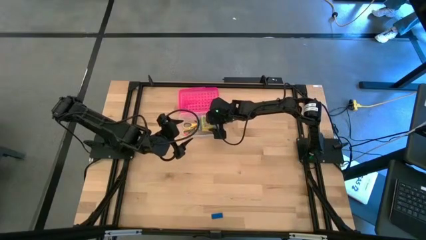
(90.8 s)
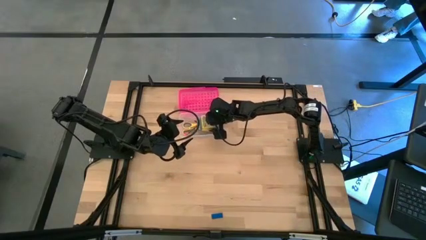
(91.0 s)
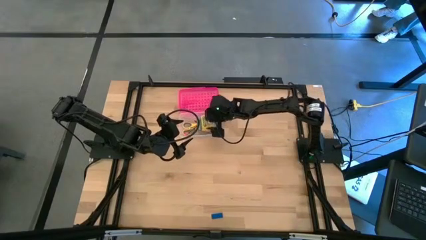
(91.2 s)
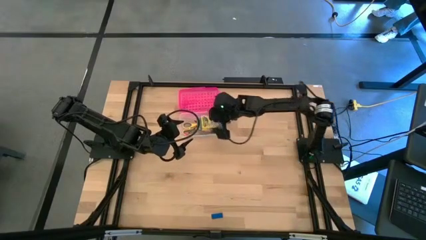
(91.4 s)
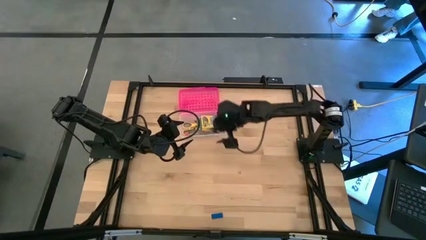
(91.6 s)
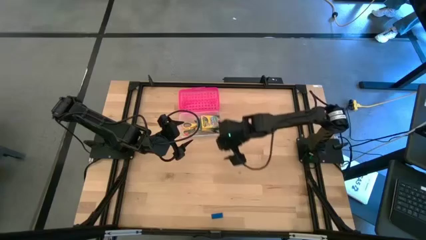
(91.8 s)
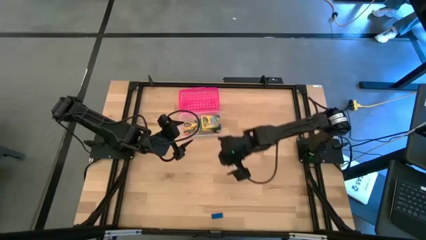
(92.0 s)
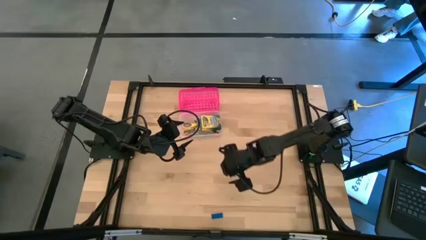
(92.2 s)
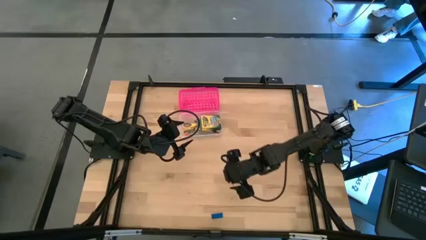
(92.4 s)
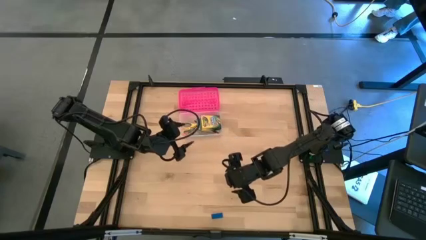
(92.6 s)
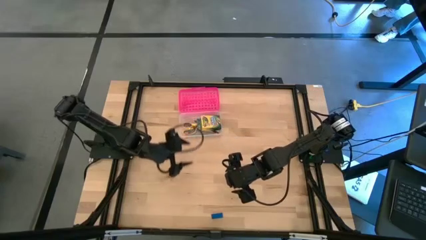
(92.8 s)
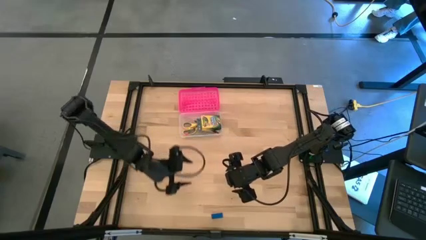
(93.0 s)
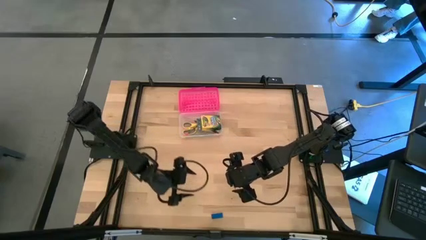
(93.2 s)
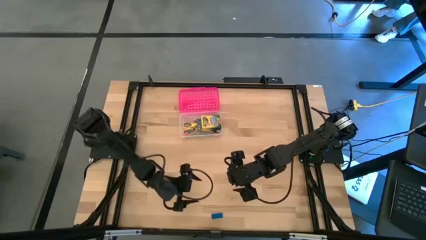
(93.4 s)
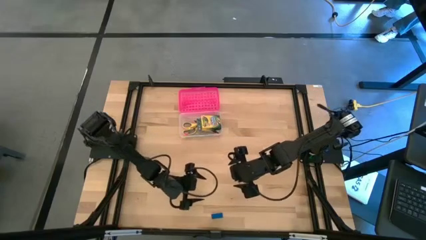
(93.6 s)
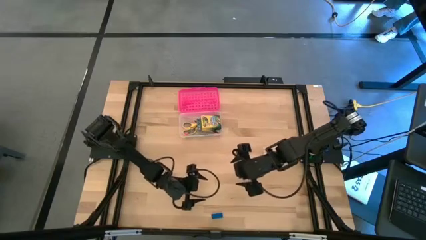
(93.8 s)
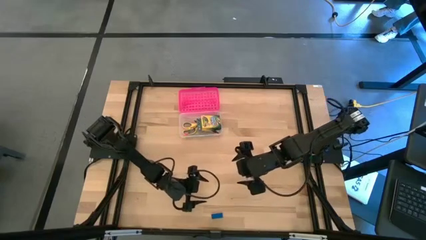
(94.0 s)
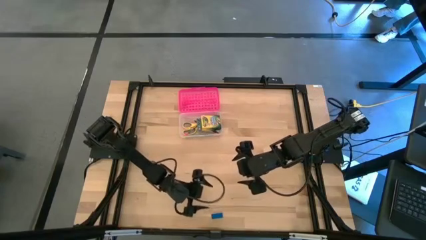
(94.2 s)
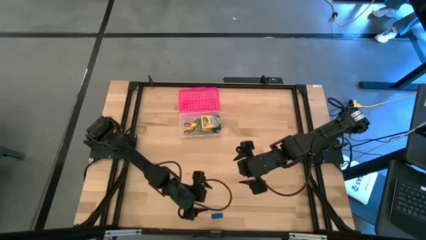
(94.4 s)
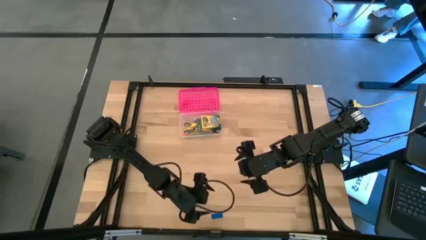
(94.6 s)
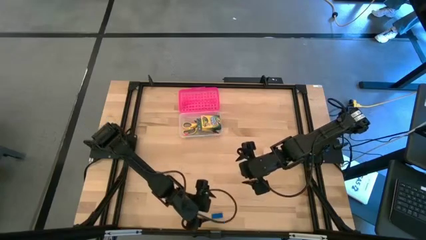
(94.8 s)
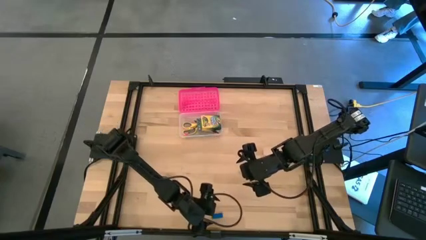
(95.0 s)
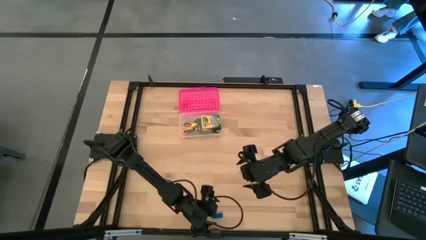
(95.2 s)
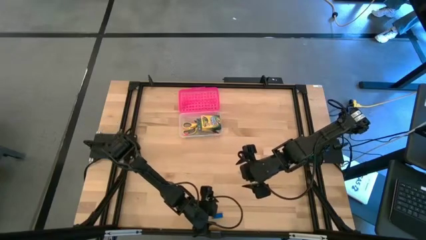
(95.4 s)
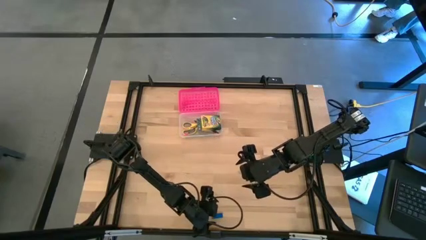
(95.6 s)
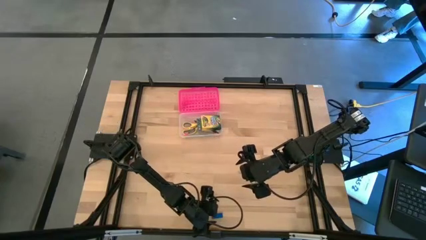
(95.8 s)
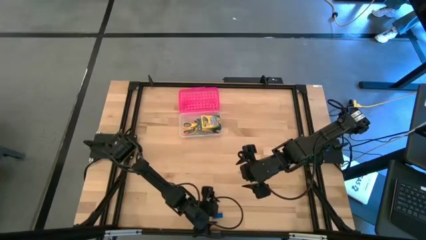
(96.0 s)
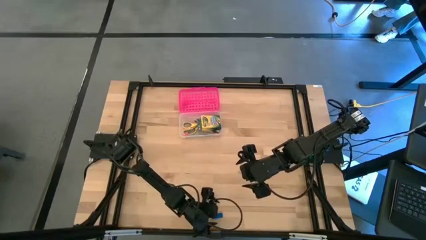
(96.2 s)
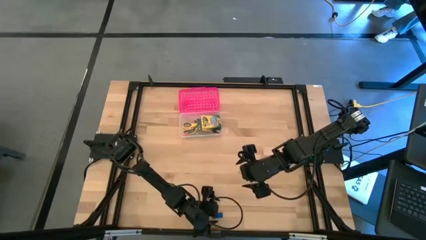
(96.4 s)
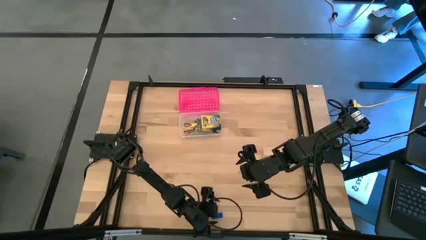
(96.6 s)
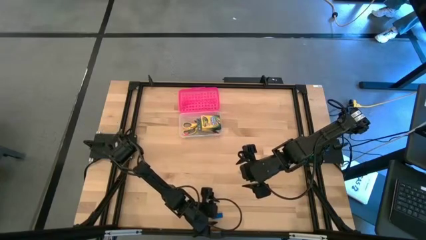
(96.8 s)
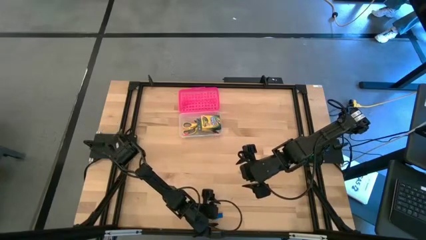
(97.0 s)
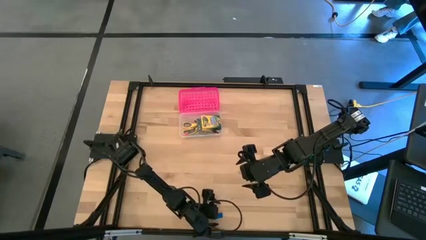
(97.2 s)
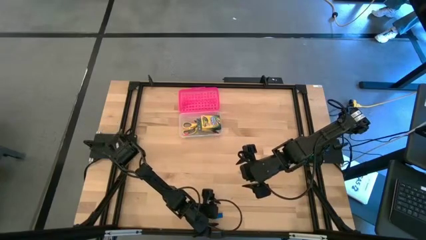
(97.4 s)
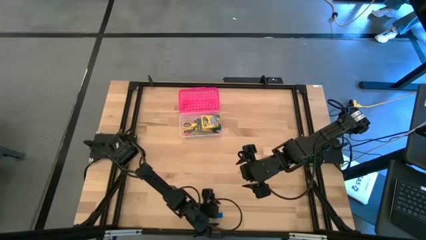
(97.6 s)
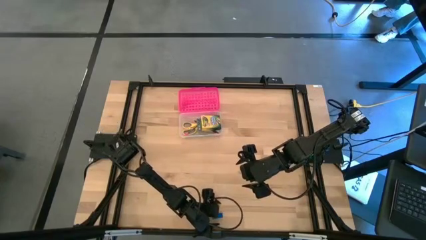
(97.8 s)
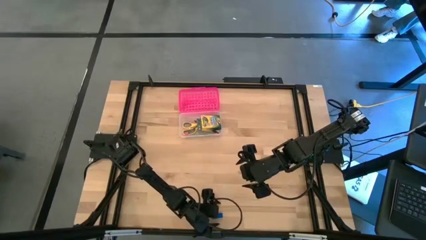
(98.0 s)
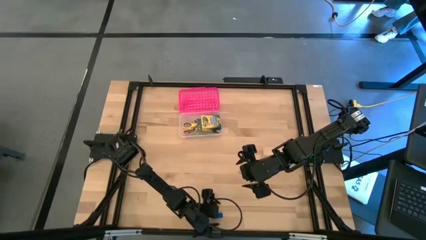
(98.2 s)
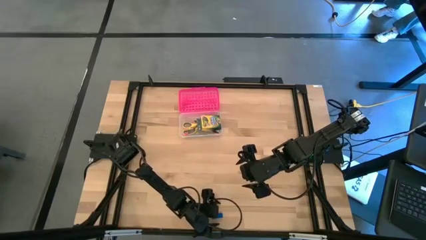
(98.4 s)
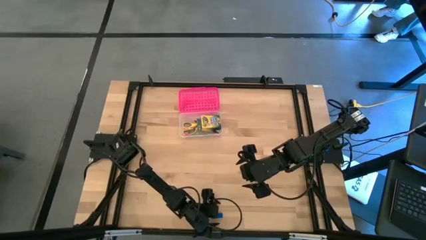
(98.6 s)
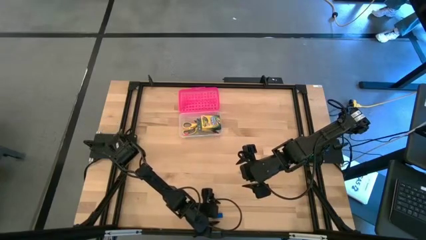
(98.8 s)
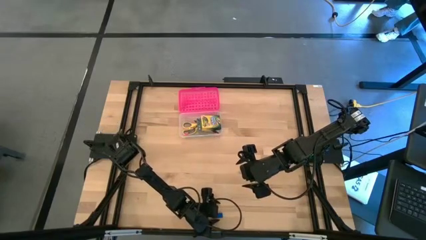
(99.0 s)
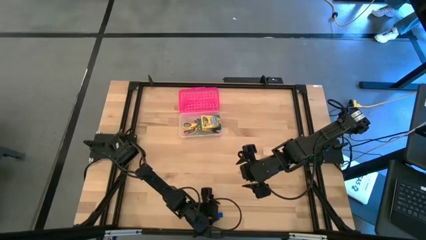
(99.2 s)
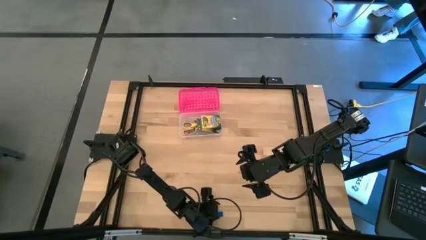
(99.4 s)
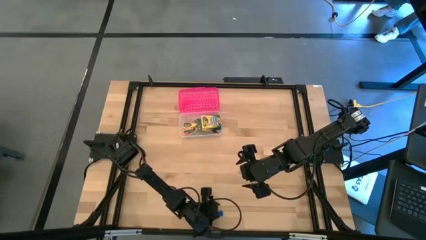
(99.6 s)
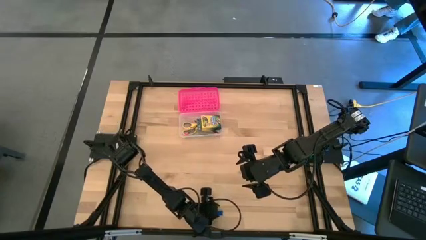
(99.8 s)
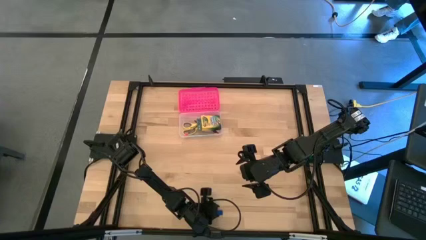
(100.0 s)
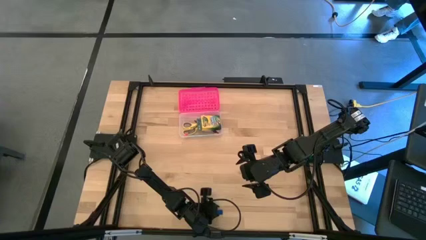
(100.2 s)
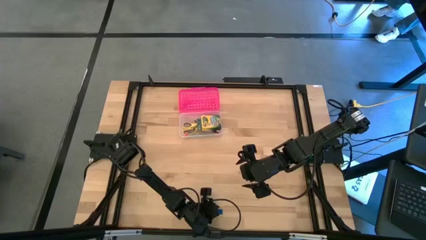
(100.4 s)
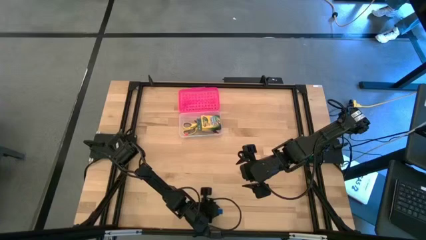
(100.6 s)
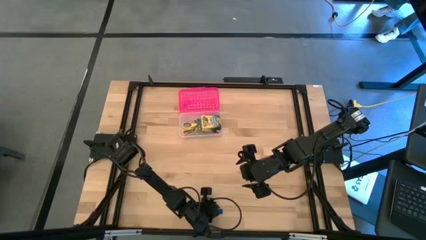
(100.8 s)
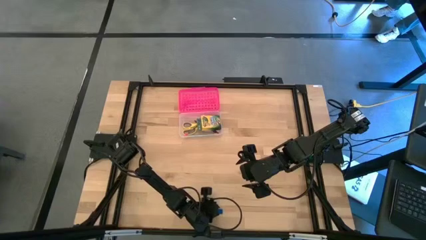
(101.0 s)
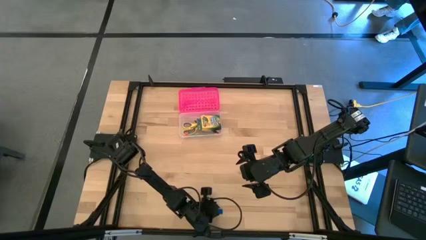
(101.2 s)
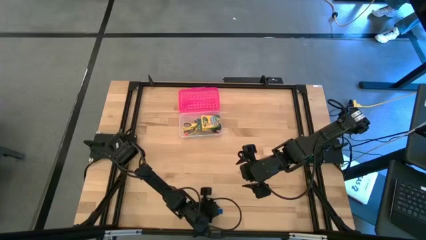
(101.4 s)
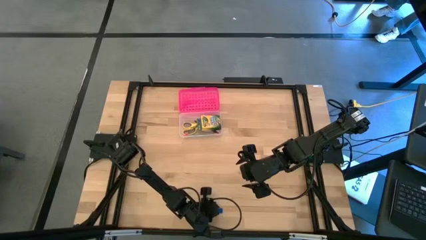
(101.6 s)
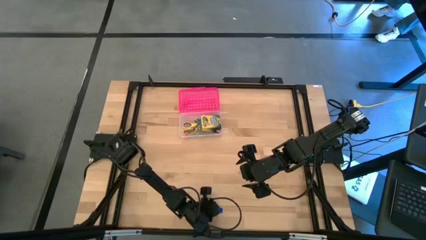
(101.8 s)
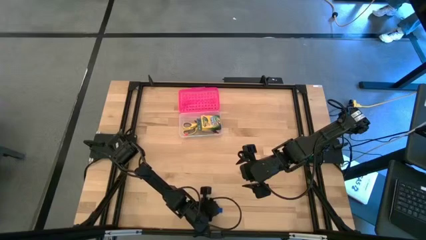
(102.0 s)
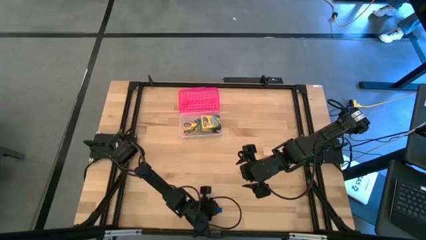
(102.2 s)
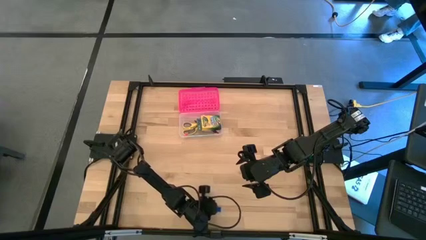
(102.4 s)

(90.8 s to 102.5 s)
Task: Pack school essentials
Put the blue eraser into the pink supply box

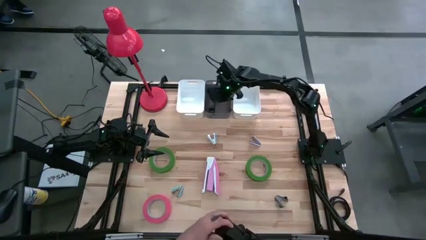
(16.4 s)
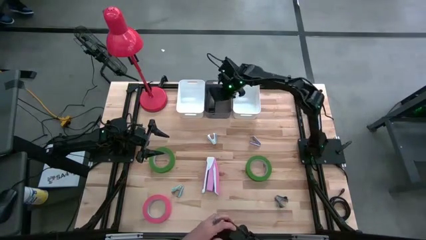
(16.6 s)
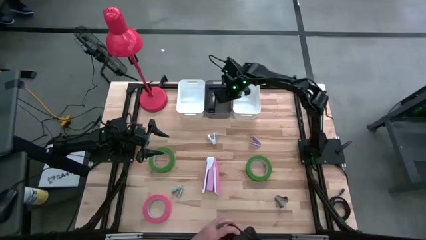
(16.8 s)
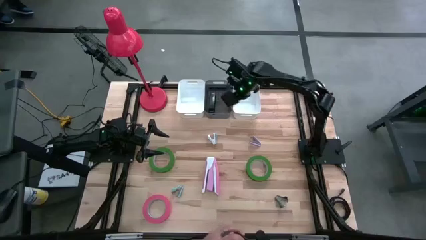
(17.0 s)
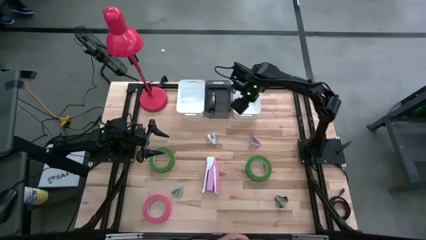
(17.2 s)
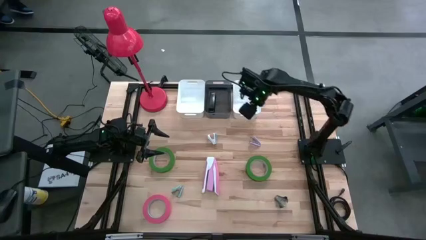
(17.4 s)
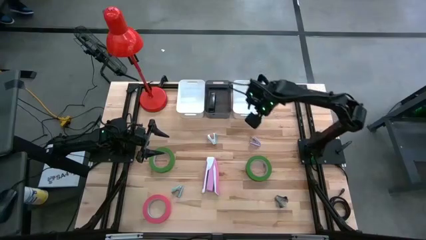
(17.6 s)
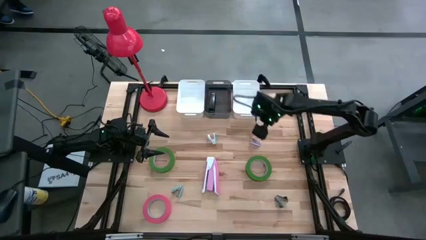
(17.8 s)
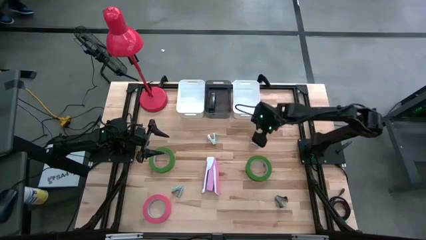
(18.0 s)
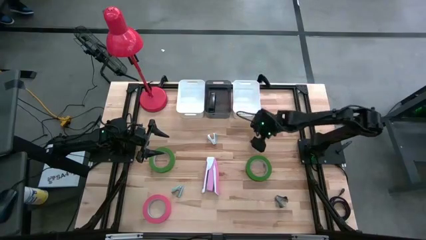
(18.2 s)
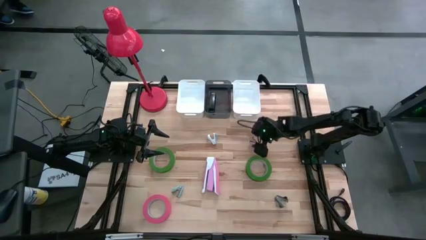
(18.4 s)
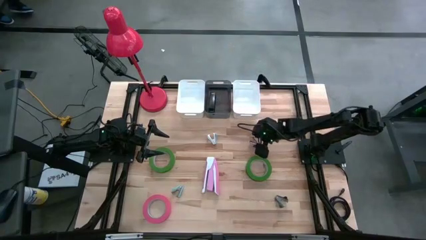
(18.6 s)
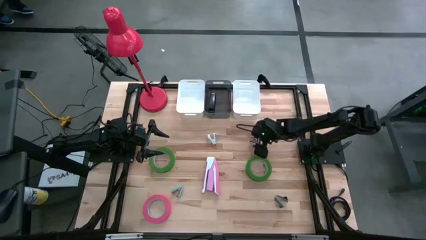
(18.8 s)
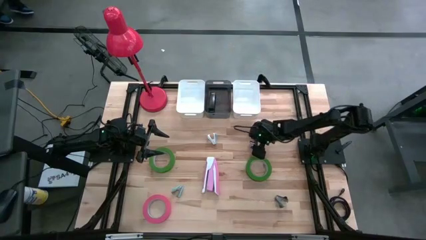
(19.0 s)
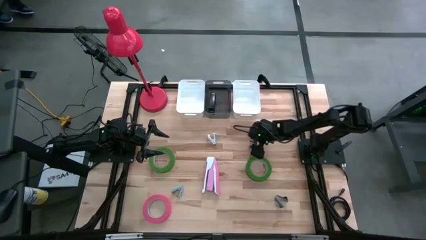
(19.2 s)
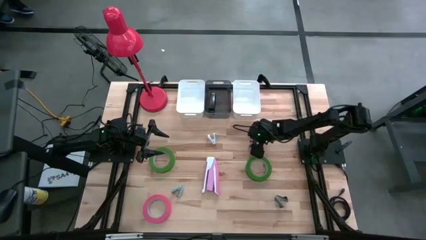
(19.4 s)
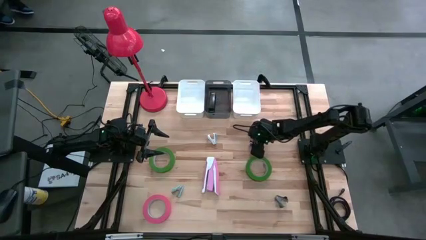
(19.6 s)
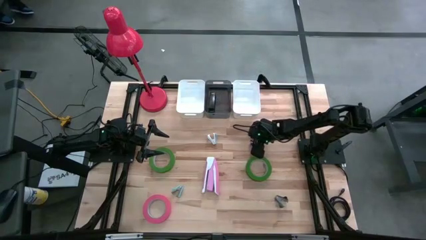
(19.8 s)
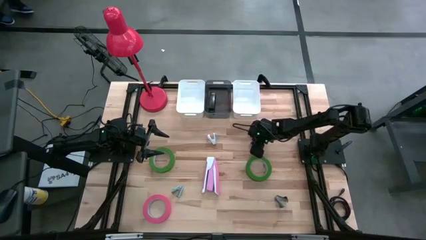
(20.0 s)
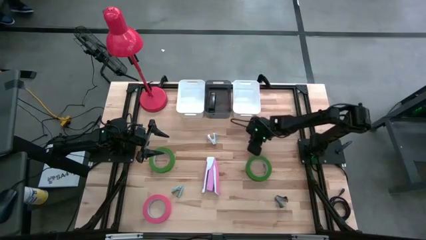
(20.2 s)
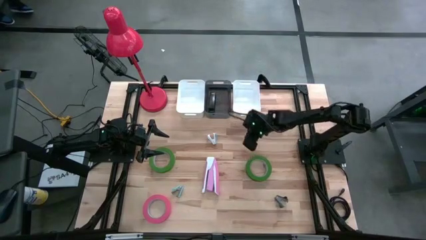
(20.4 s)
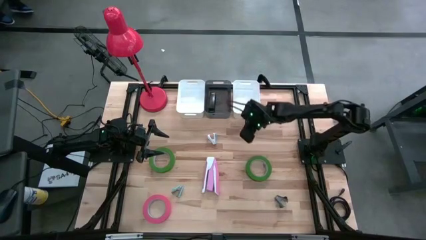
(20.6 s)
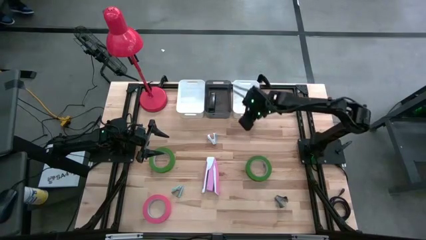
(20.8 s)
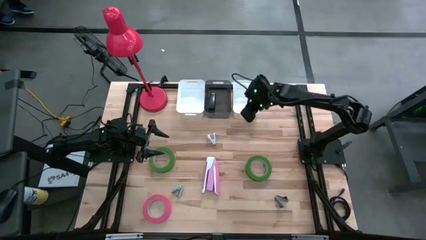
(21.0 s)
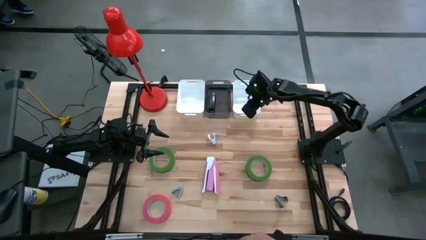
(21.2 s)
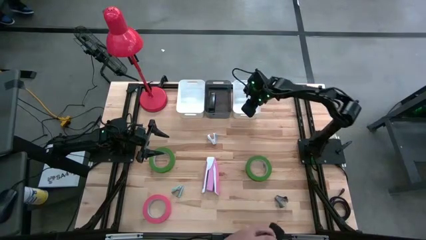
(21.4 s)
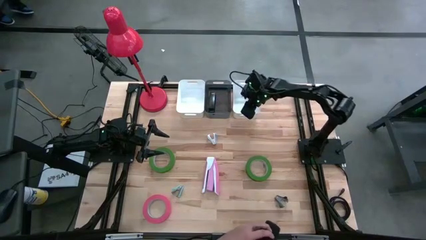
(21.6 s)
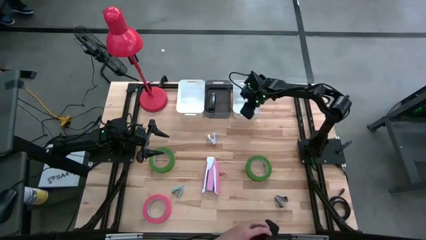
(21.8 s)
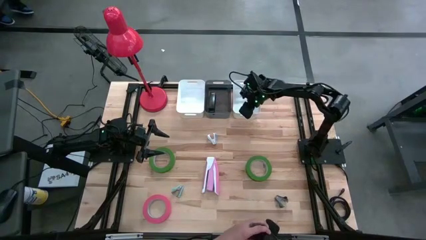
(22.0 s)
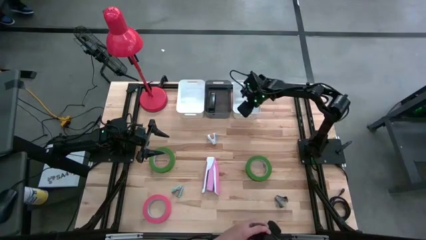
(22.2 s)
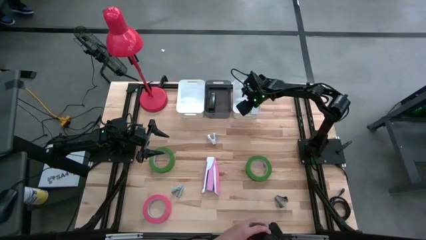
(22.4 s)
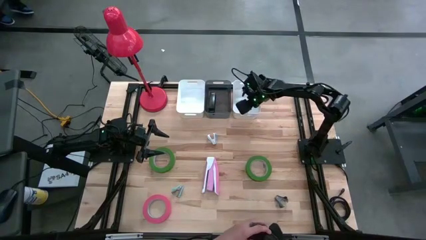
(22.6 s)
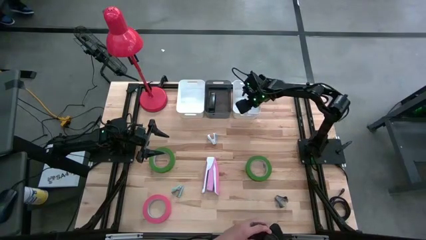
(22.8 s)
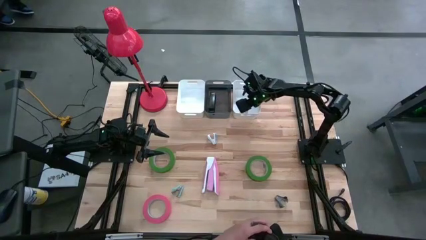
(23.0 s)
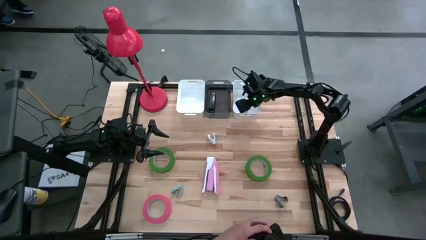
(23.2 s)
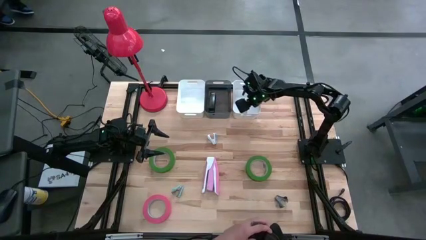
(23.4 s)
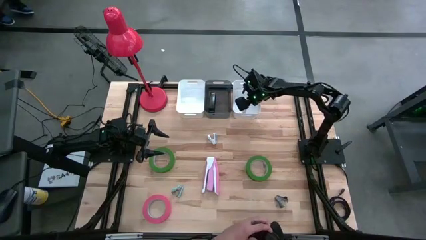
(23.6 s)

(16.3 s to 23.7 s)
Task: Pick and place Stapler, Stapler remover, tape
Put the purple staple remover into the right white bin
